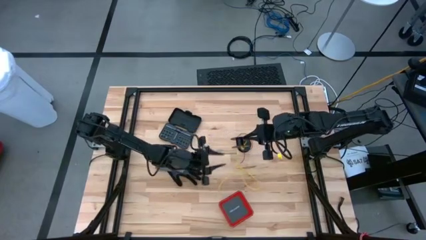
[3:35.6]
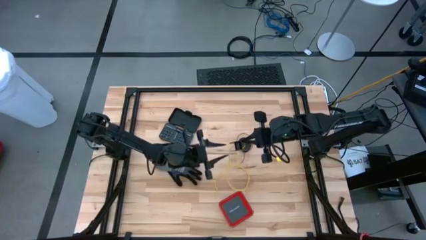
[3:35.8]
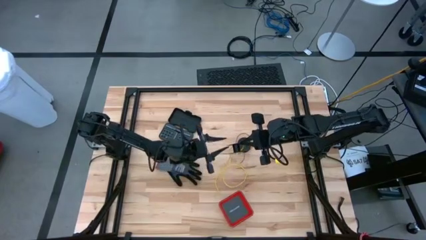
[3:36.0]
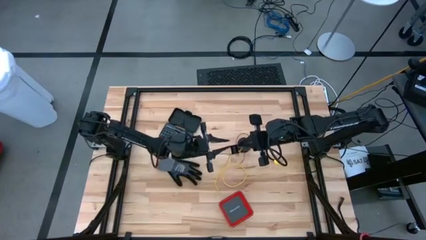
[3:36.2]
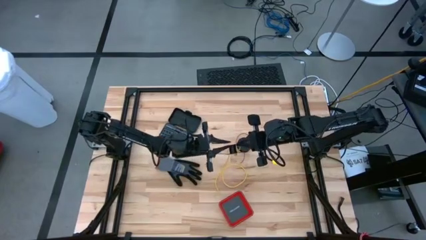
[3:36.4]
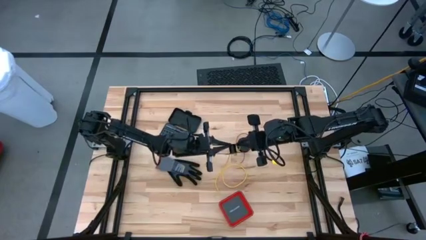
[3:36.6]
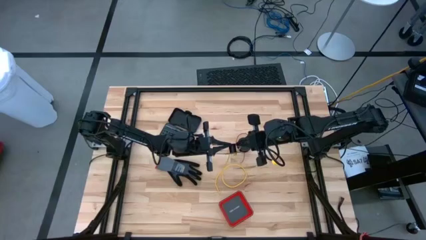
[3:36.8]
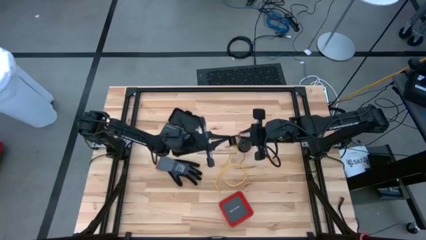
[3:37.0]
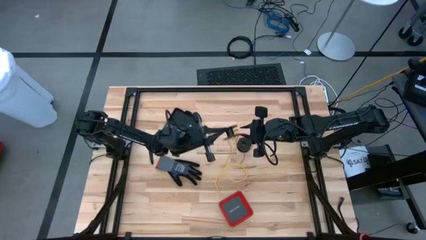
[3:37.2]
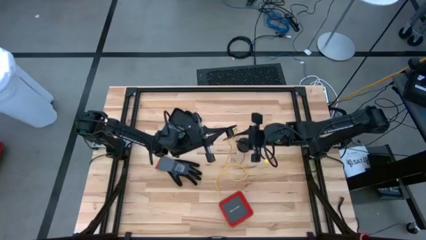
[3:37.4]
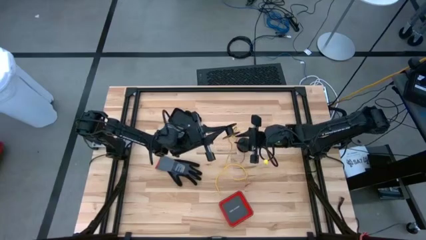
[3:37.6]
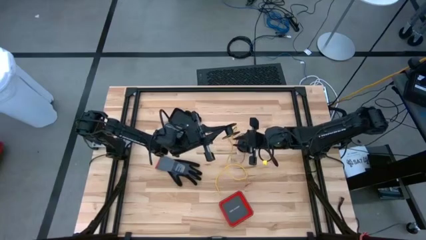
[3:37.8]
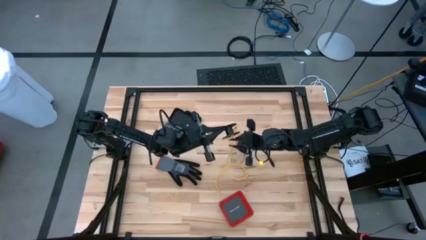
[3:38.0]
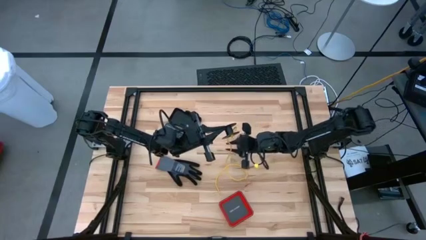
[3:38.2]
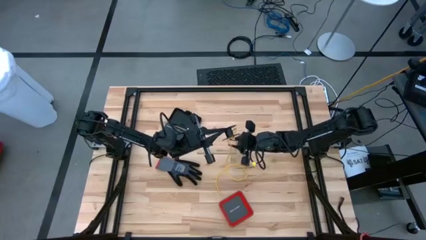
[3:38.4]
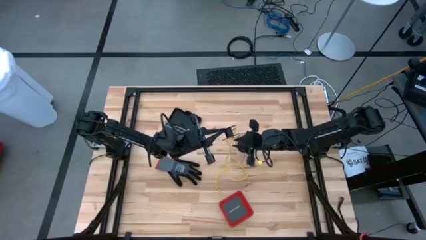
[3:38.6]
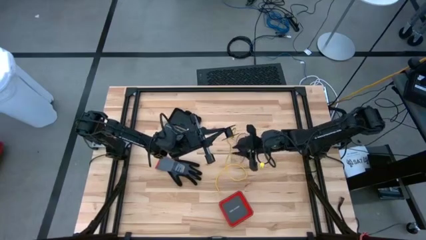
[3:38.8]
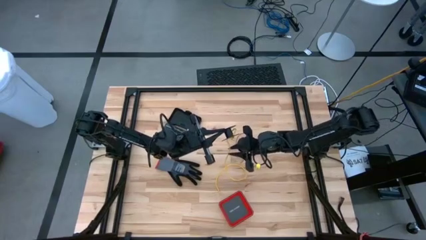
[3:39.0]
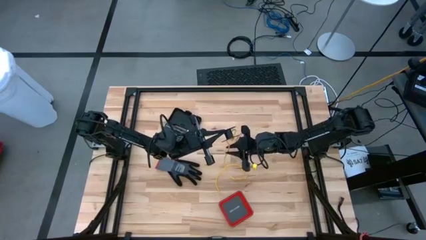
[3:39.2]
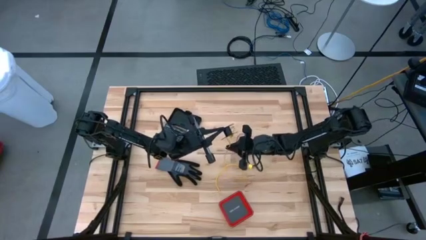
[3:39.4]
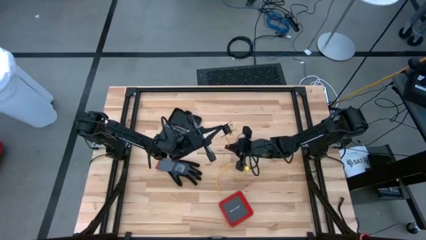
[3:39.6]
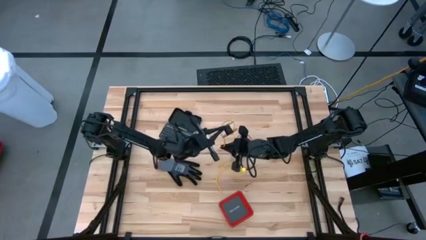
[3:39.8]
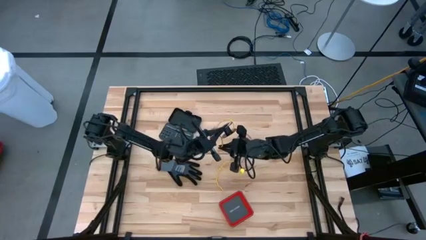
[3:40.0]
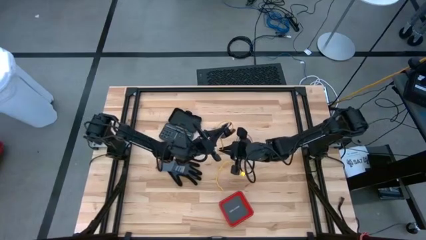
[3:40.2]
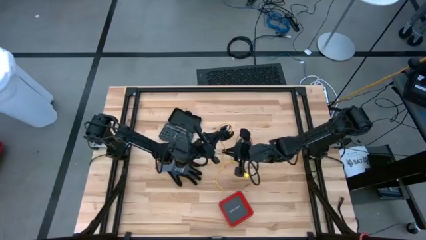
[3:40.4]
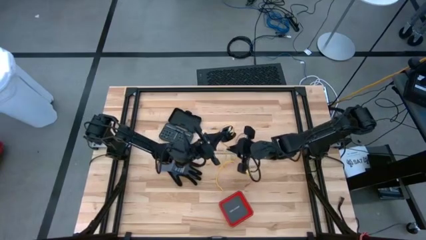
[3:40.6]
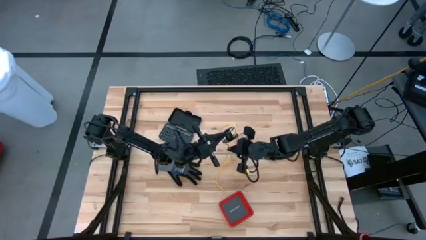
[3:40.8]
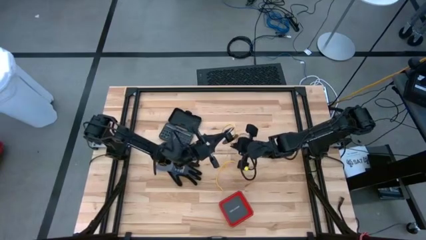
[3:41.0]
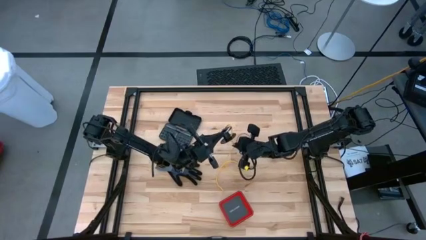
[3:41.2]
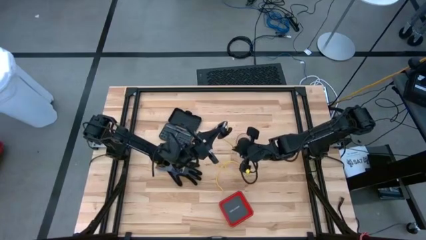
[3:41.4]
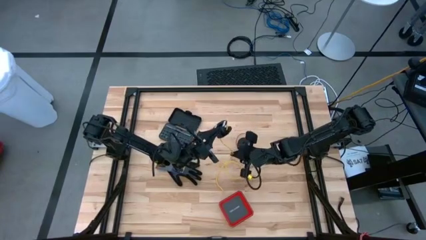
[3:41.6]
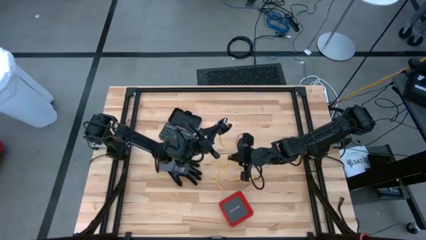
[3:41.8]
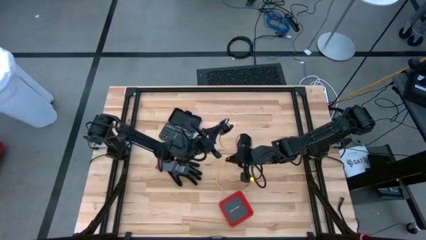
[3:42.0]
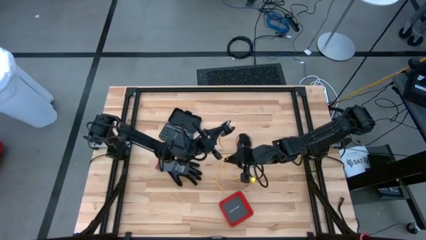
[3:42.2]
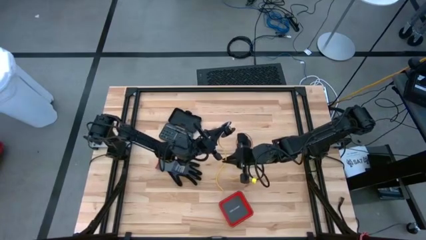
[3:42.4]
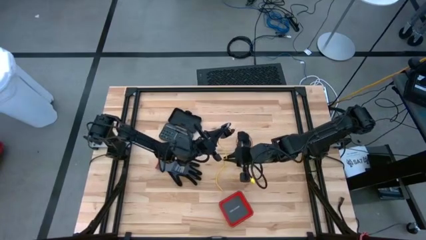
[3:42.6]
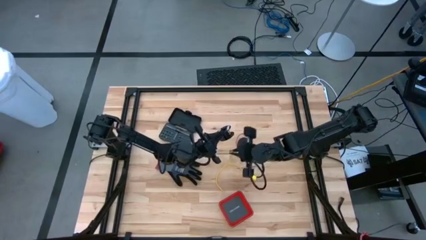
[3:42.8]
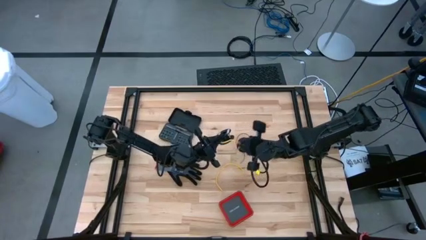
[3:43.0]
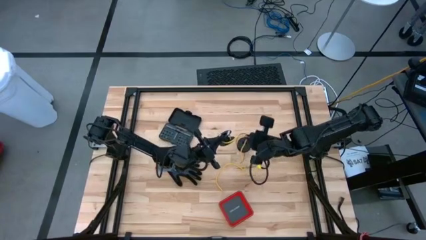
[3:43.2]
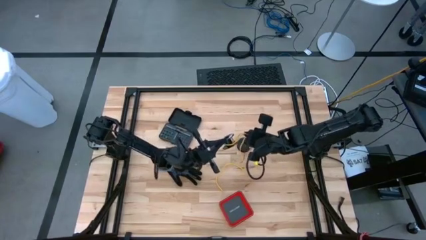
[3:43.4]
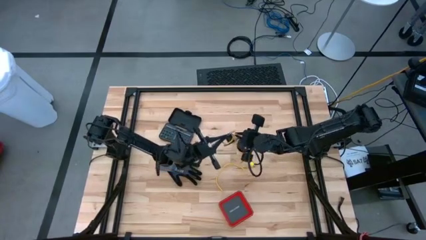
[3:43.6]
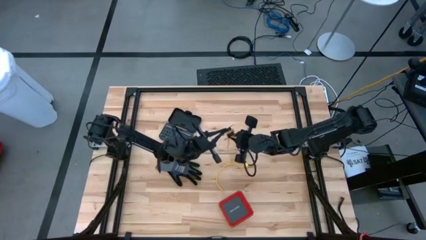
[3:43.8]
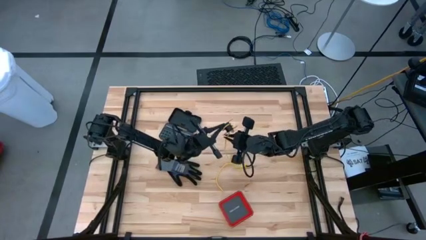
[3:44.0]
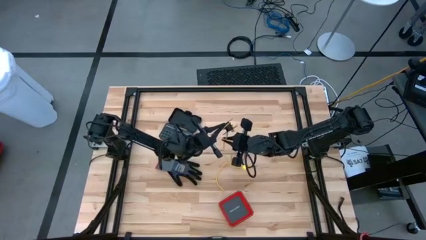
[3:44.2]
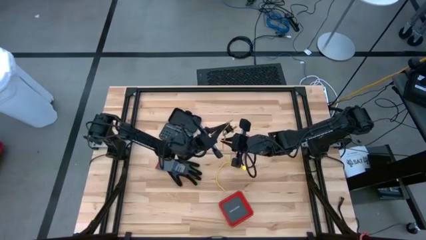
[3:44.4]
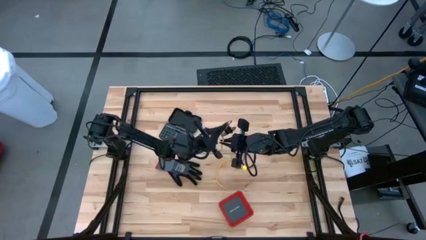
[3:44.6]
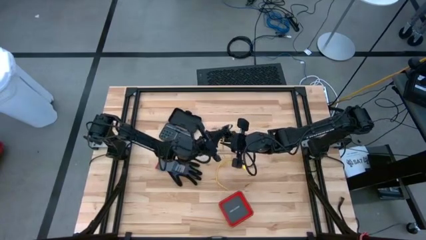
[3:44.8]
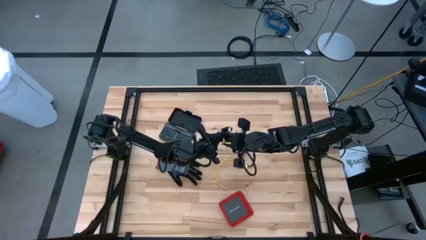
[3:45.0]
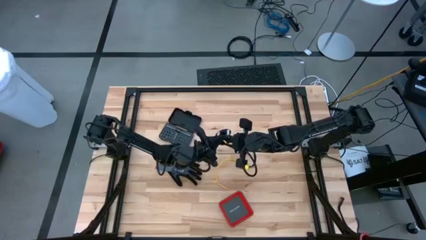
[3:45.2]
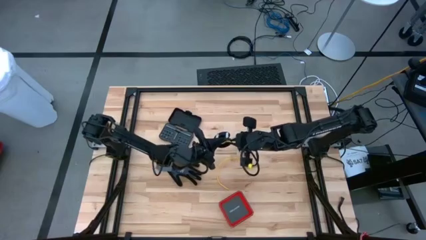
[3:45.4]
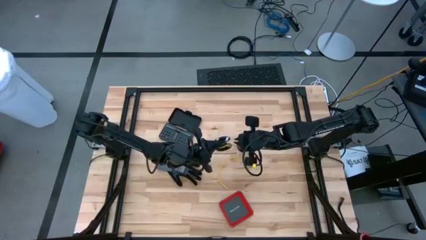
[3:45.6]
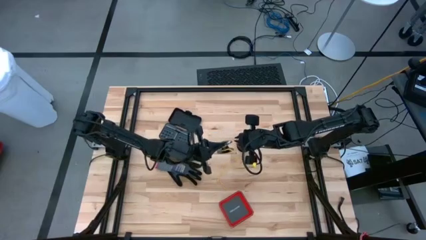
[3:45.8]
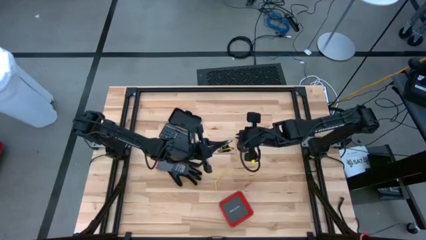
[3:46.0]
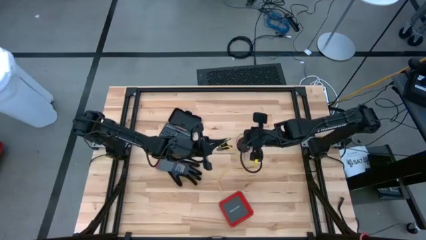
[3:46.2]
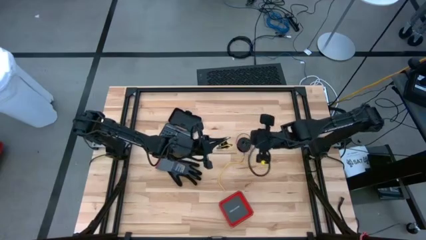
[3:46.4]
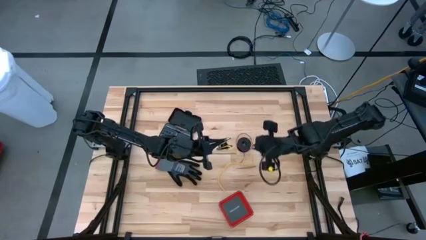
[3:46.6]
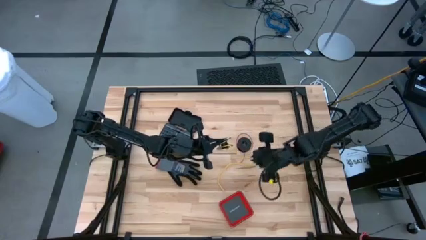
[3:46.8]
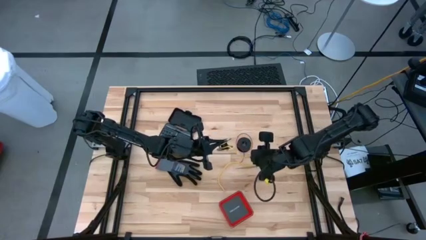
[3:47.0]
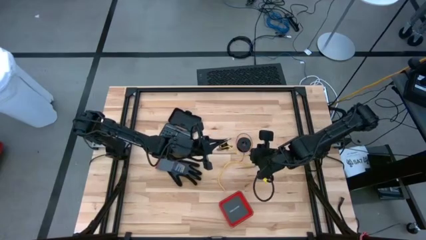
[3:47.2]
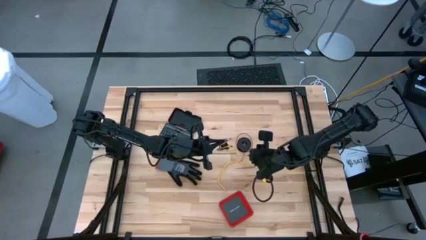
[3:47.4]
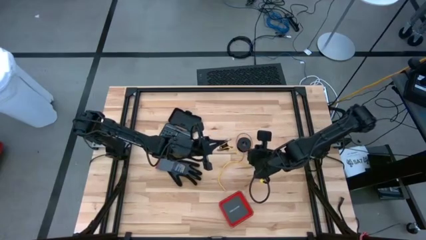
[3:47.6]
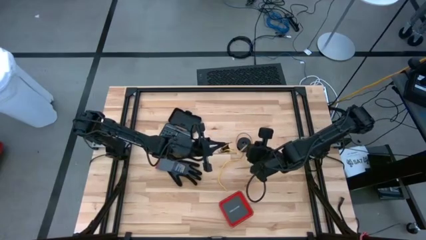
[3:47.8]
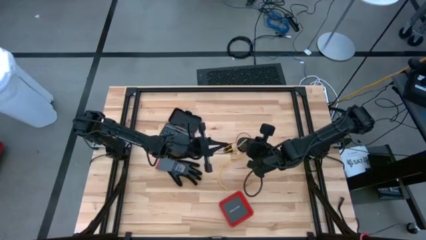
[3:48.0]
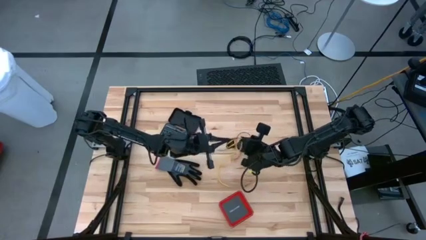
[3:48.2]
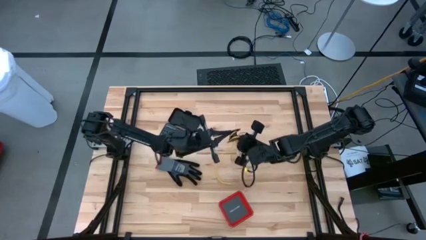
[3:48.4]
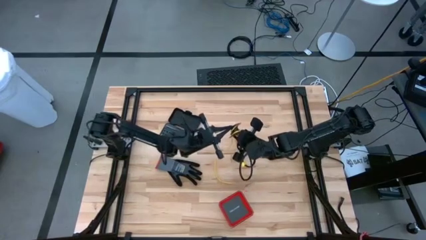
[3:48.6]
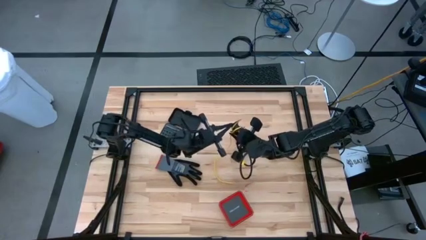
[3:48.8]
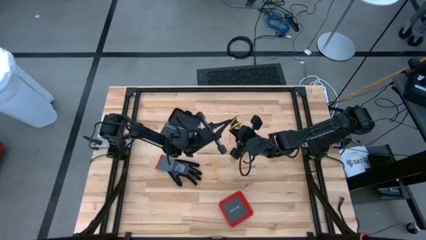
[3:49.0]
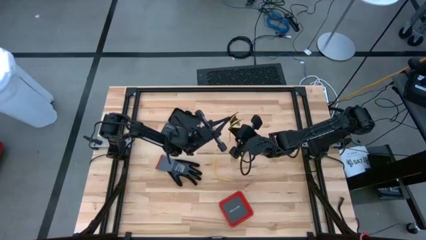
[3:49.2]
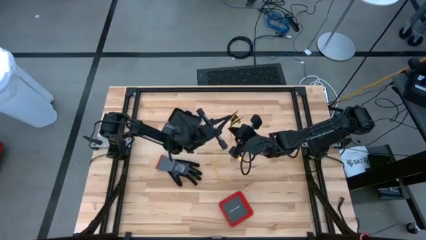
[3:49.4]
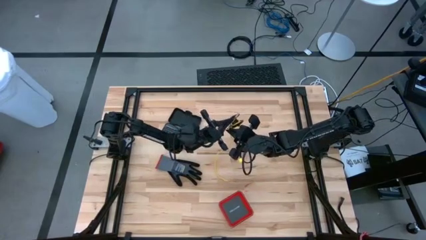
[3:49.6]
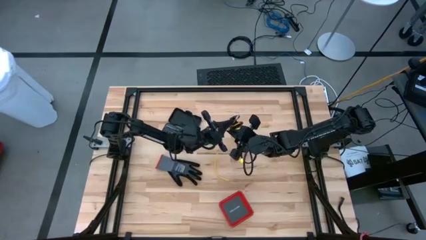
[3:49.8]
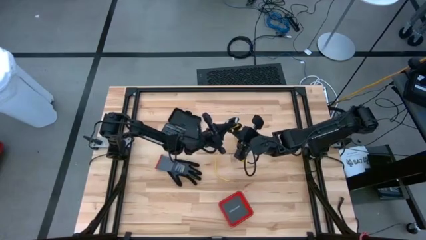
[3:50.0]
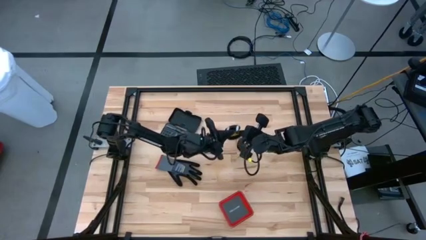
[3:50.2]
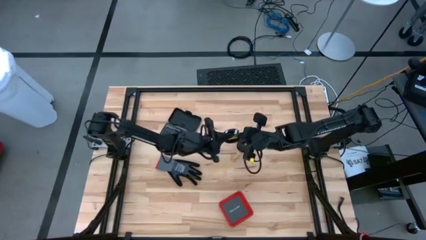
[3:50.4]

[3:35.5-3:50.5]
Task: Coil cords
Coil the yellow wire onto the spool
